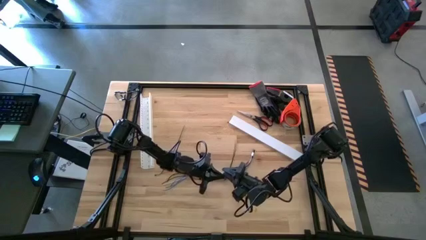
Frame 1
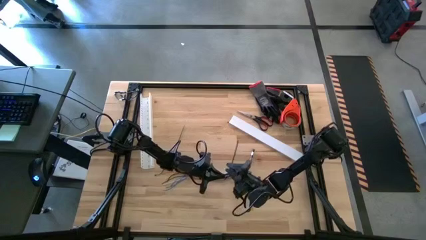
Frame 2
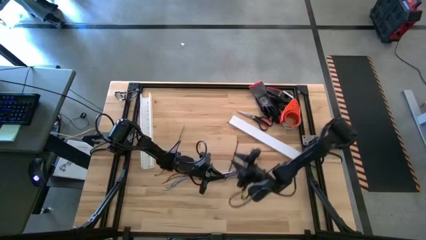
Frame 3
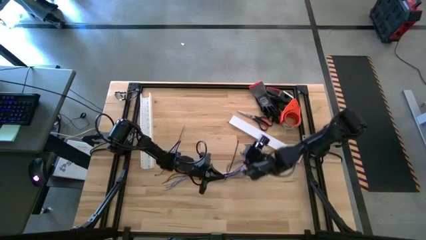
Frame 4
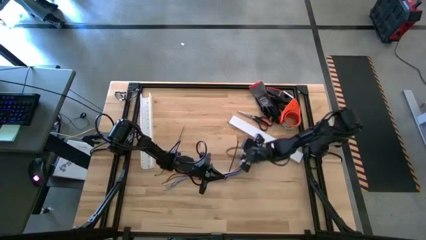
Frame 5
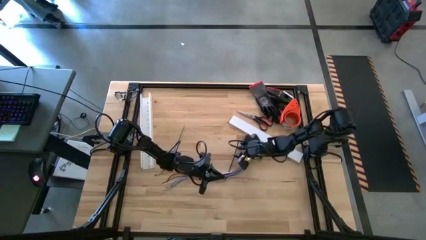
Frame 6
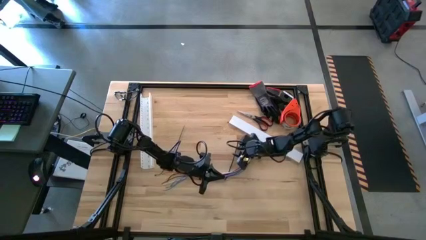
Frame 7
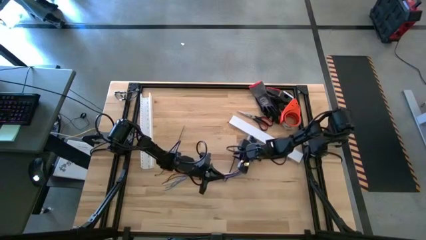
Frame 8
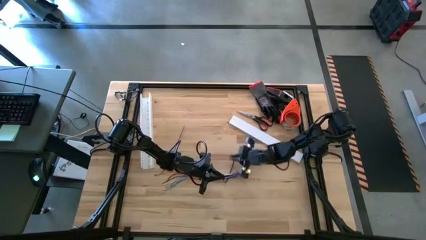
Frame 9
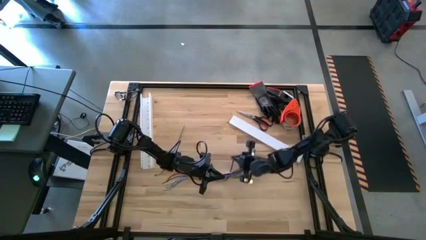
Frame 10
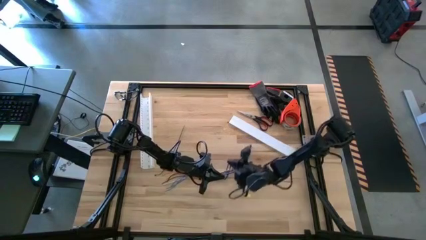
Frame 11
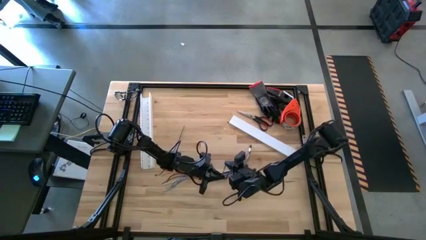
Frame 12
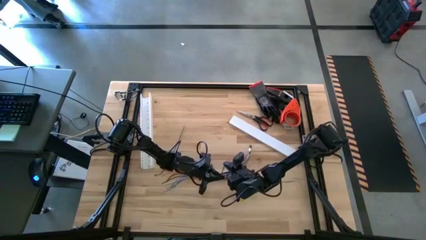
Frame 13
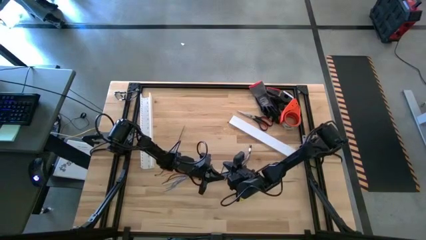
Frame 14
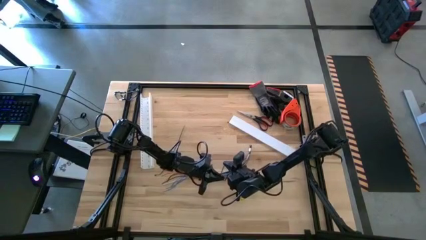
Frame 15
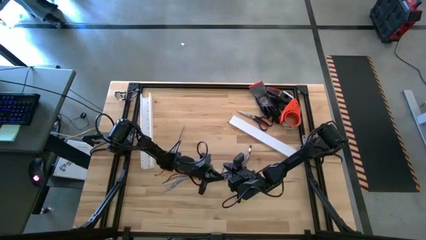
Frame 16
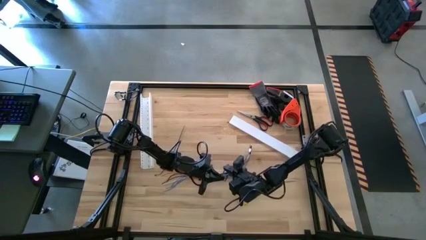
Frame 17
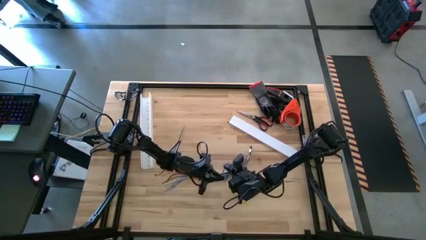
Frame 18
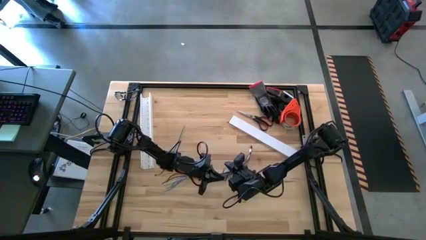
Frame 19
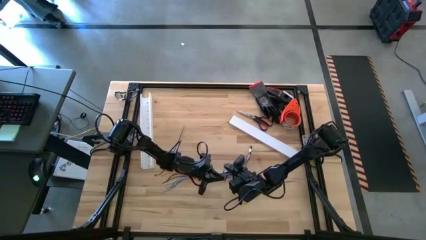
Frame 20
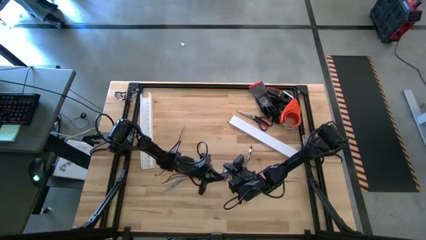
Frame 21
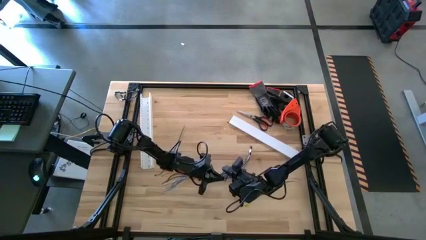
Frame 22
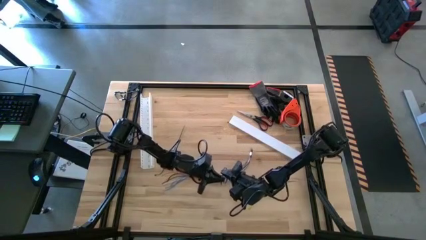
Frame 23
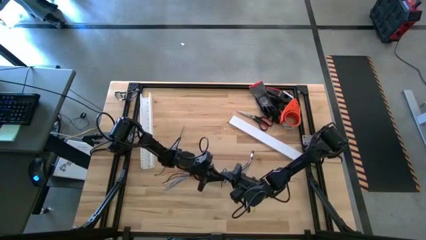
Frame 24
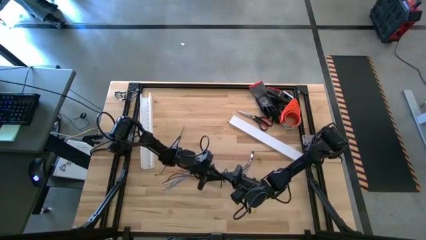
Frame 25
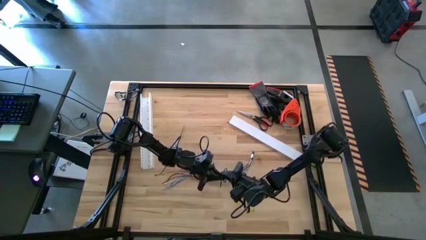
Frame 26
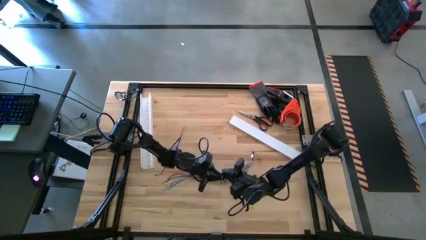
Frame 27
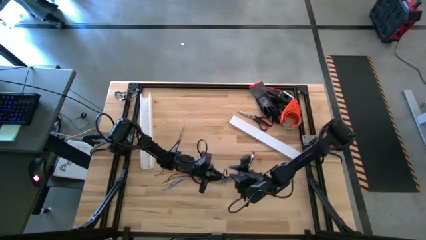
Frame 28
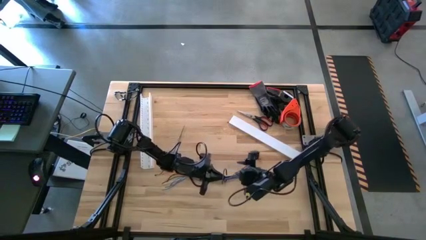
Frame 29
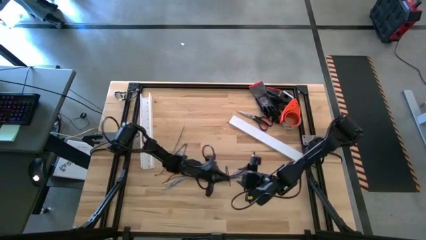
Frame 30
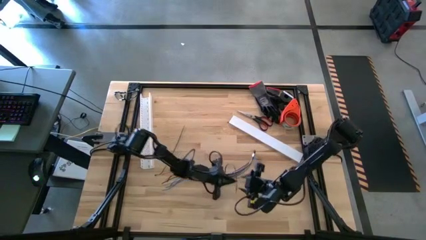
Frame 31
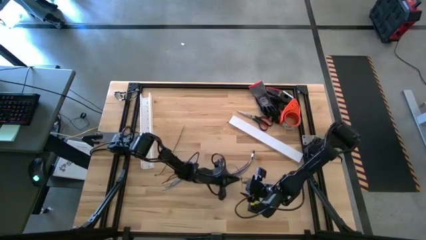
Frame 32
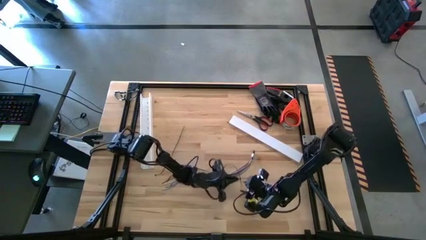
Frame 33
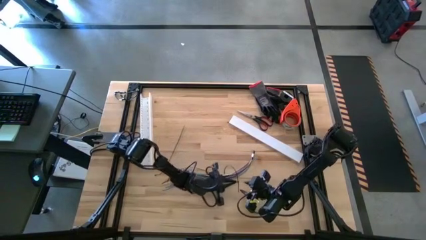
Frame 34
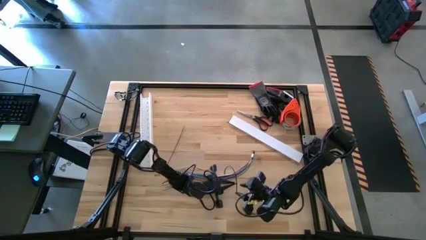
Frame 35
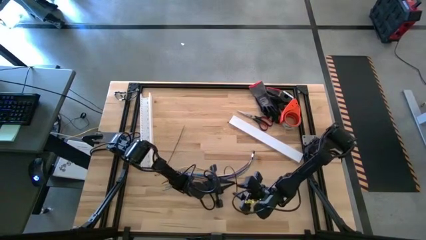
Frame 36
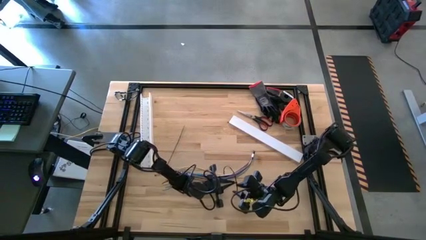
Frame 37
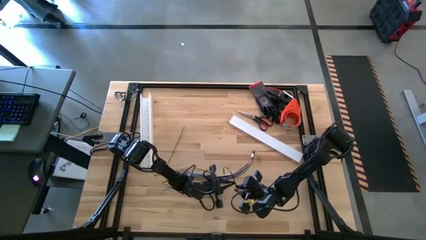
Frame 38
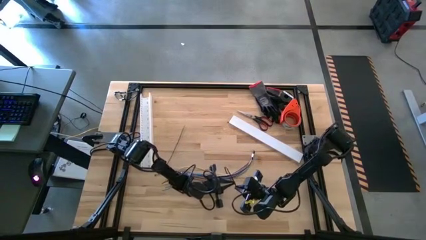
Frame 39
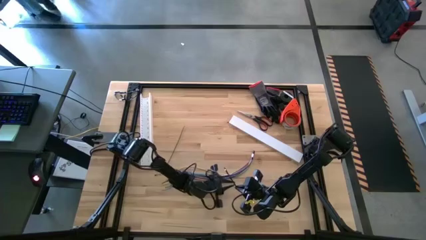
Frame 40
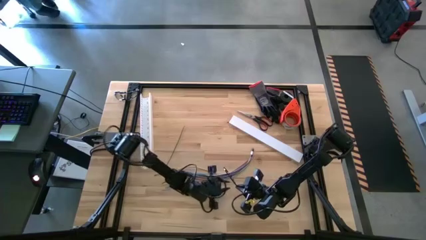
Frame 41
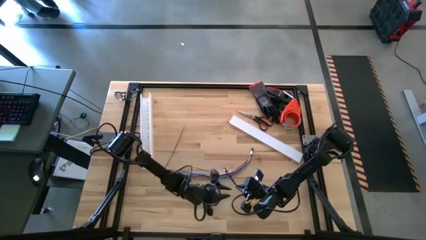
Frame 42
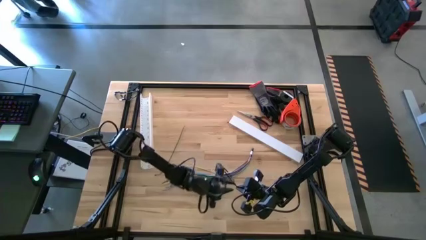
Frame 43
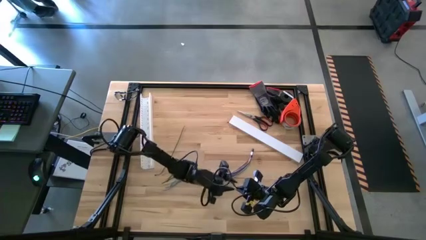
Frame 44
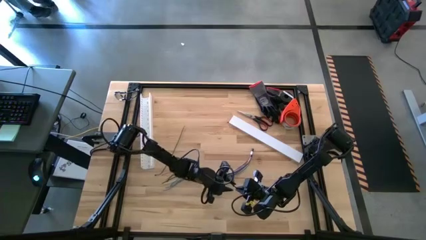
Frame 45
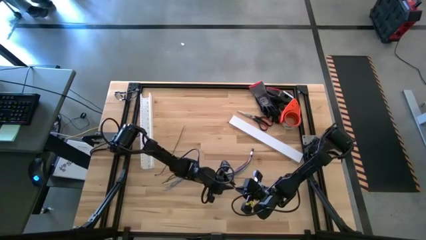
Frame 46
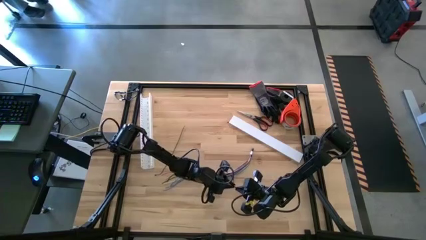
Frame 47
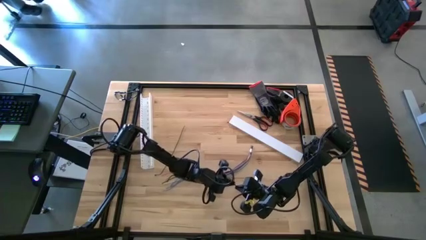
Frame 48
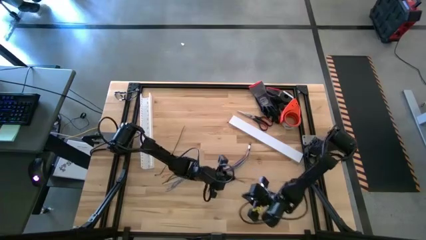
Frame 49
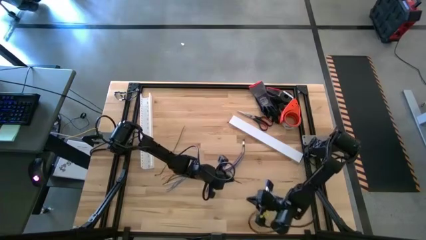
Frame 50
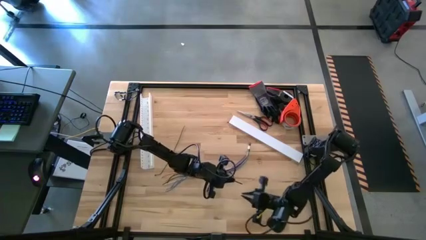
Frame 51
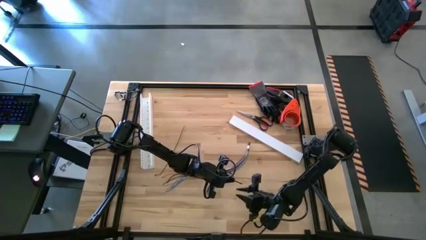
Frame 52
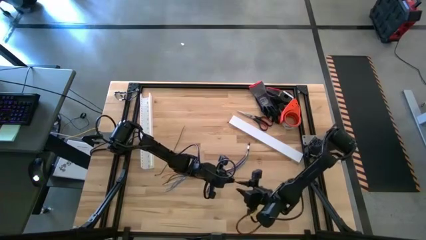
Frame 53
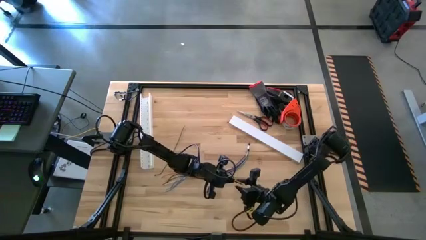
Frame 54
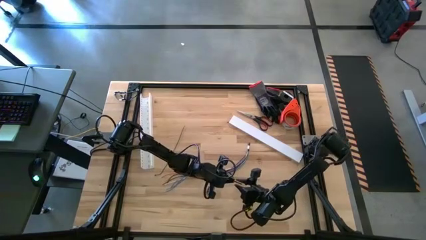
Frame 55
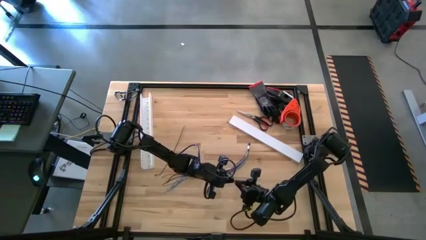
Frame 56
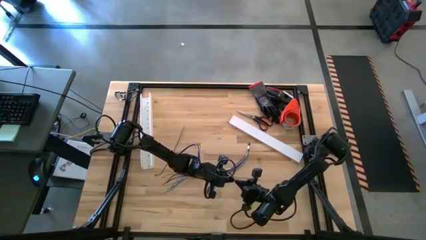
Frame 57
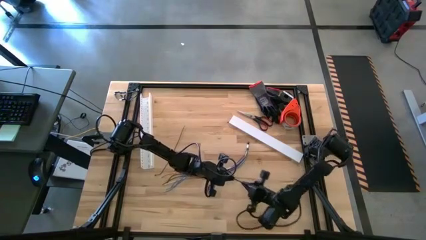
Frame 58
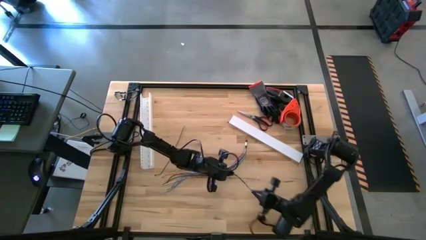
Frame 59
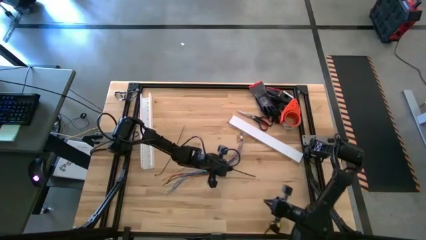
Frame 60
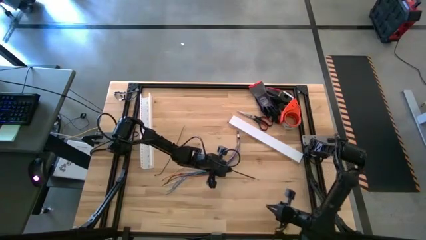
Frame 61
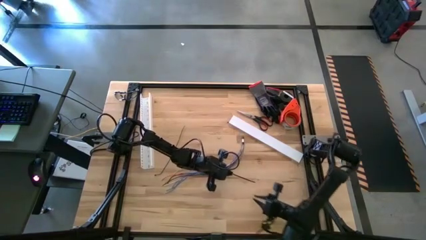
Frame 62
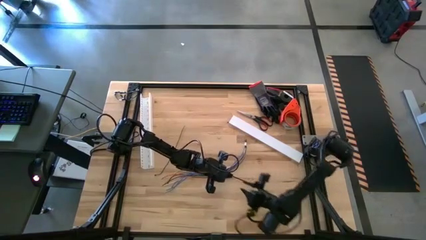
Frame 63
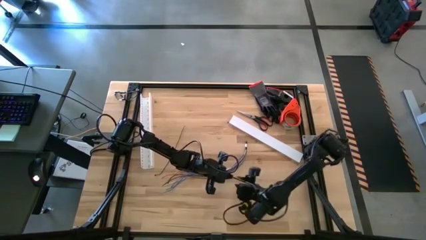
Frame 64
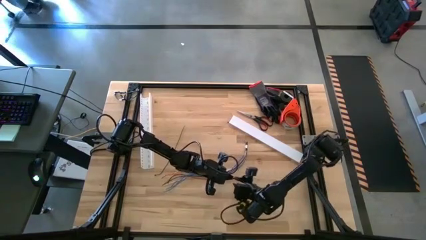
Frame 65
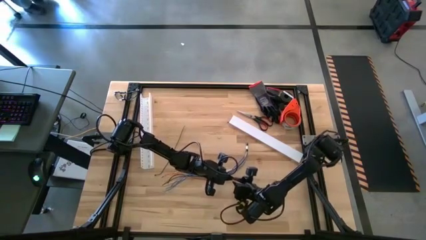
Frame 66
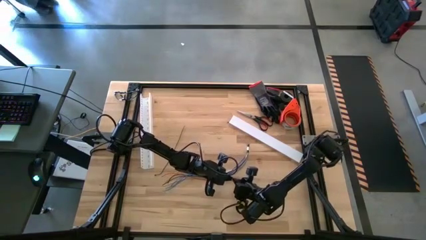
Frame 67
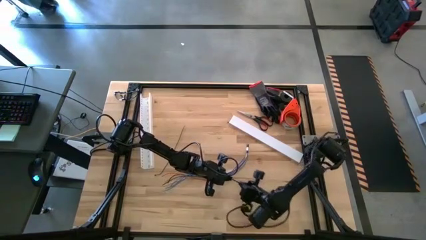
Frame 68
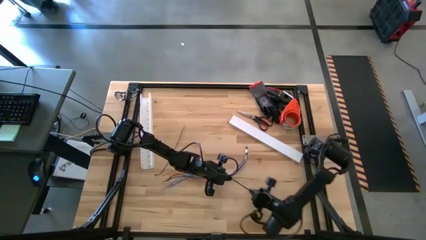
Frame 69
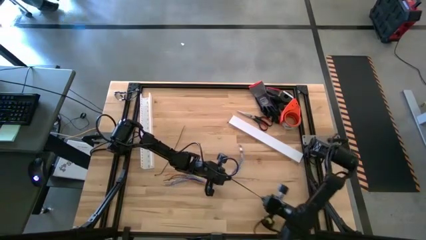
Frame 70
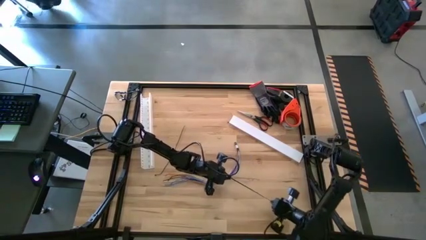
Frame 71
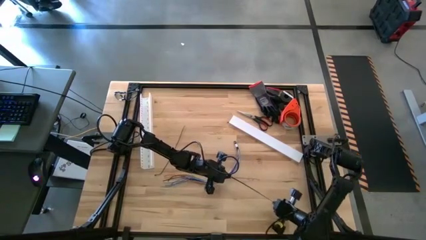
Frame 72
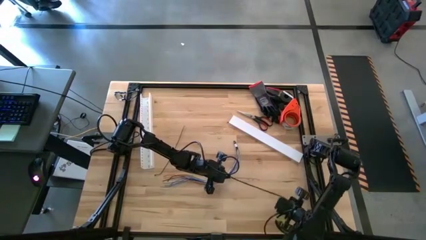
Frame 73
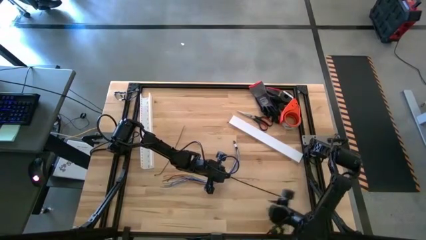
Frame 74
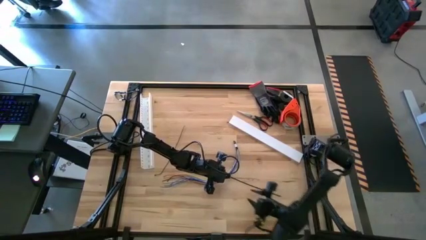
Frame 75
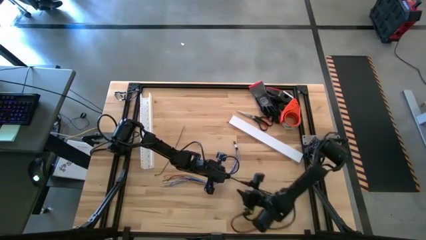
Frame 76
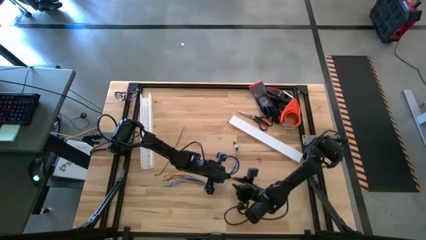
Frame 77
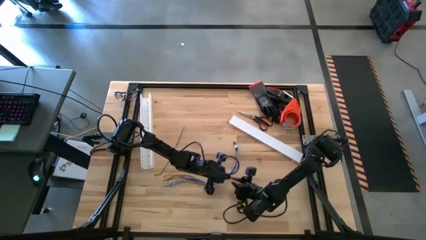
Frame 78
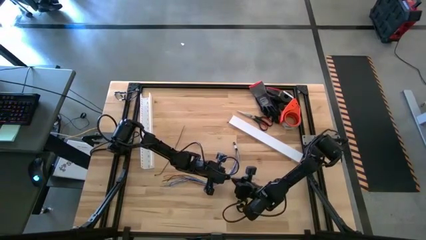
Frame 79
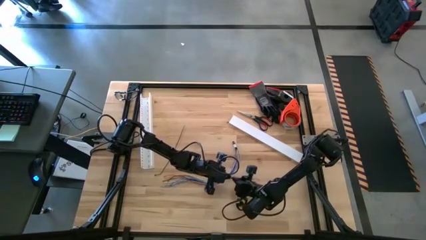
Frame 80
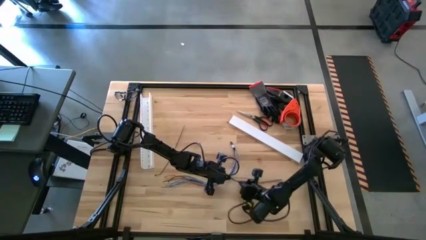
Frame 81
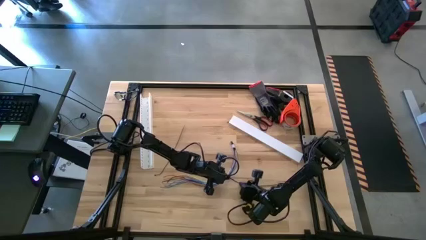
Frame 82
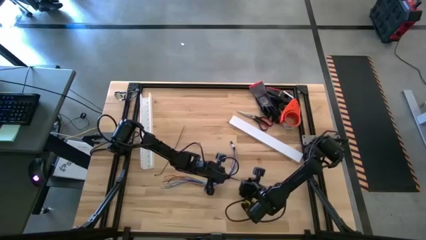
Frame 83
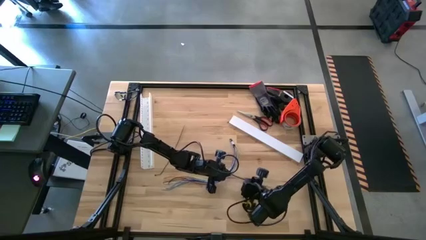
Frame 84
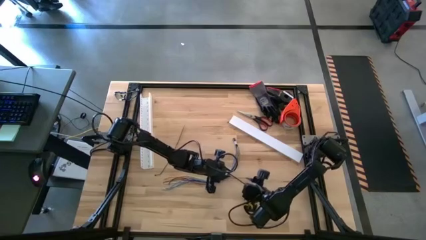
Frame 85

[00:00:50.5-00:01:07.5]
Task: Ziptie cables
Wrap the zip tie on the cable
